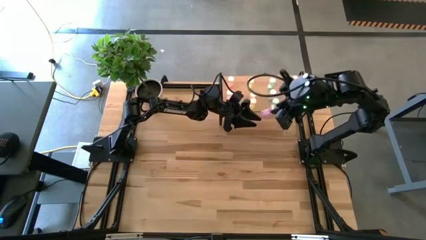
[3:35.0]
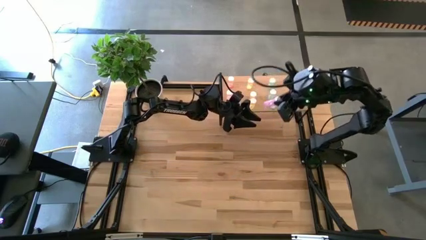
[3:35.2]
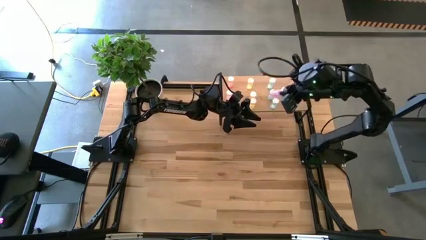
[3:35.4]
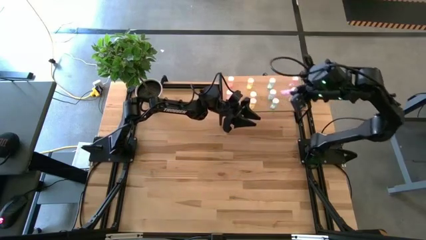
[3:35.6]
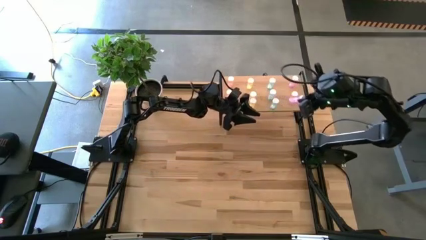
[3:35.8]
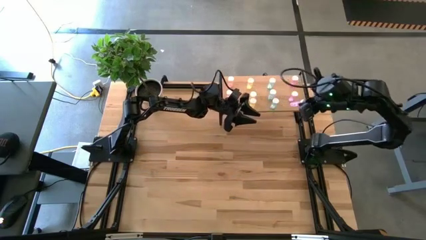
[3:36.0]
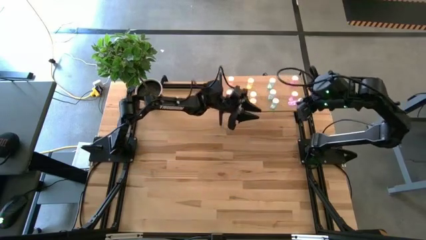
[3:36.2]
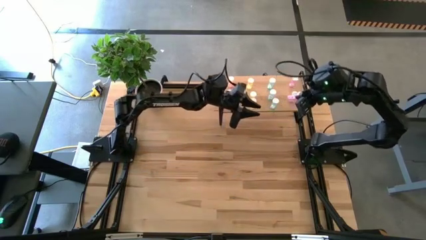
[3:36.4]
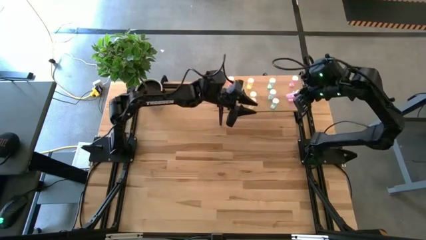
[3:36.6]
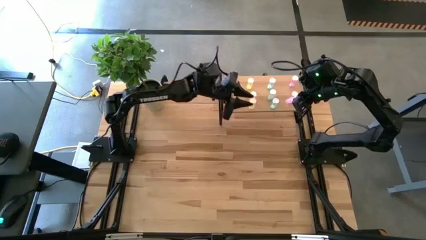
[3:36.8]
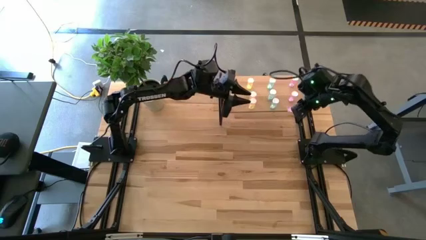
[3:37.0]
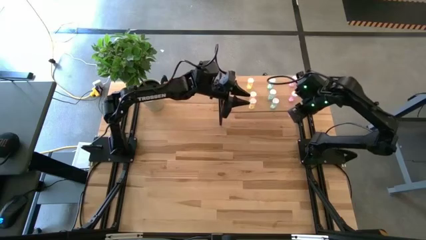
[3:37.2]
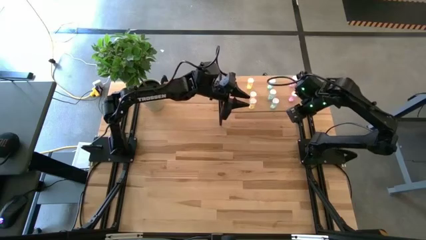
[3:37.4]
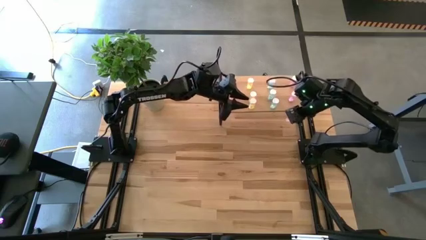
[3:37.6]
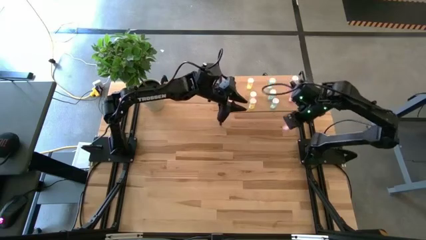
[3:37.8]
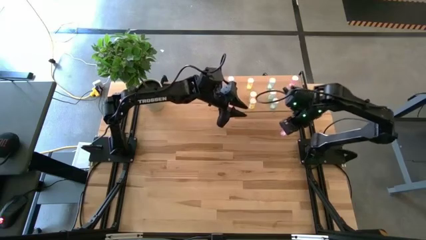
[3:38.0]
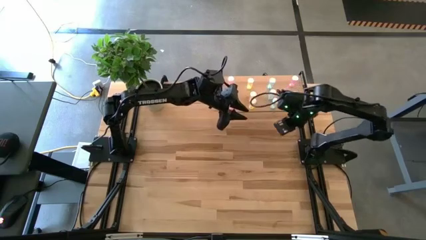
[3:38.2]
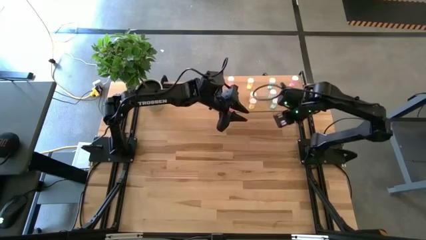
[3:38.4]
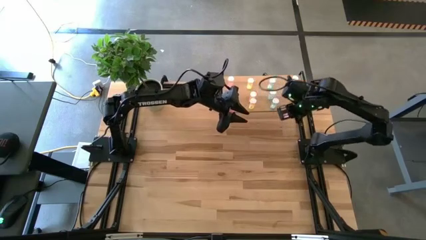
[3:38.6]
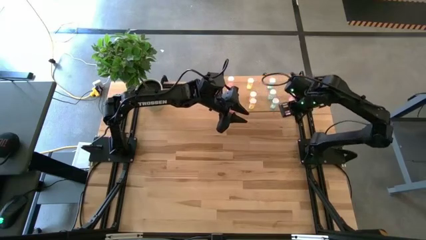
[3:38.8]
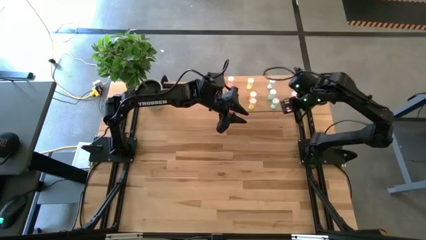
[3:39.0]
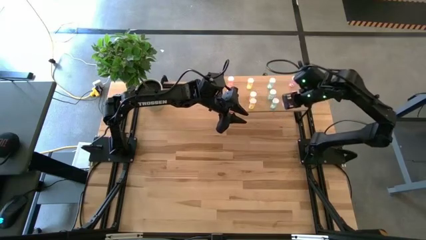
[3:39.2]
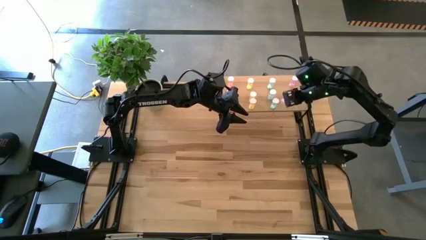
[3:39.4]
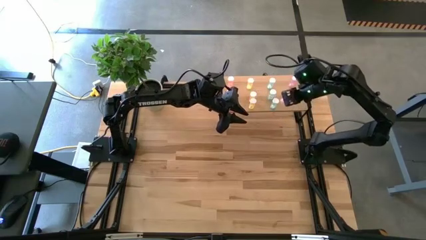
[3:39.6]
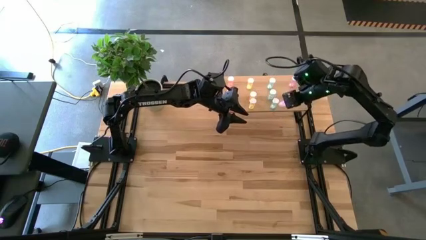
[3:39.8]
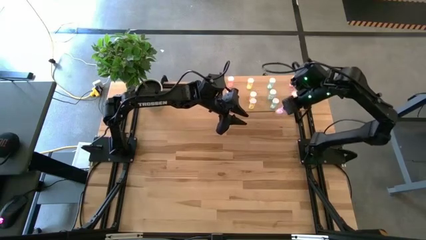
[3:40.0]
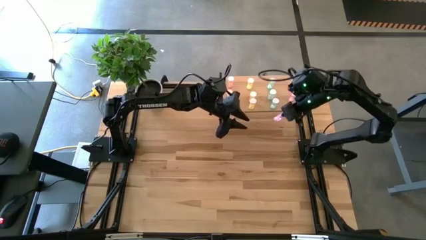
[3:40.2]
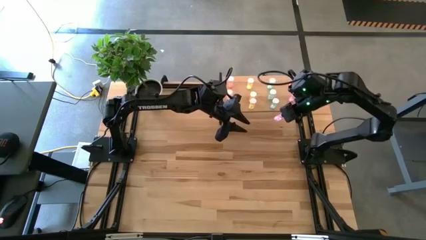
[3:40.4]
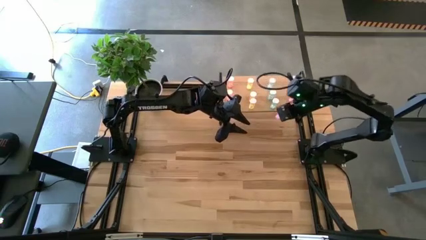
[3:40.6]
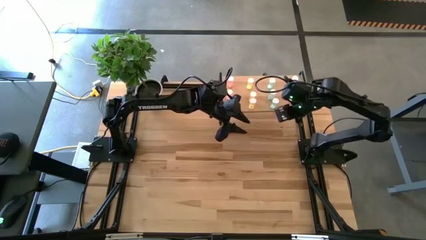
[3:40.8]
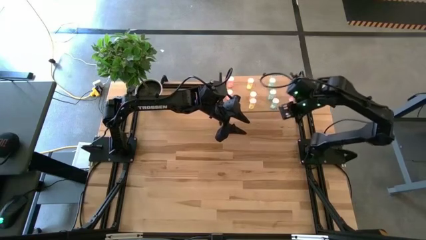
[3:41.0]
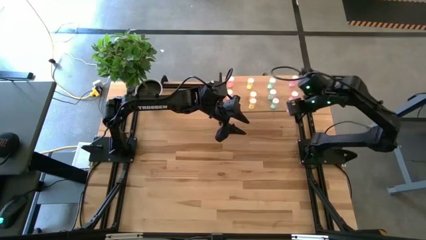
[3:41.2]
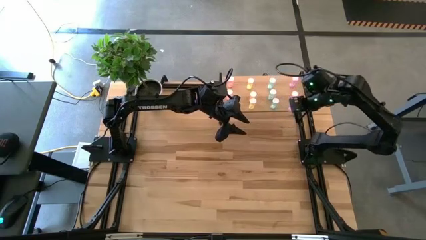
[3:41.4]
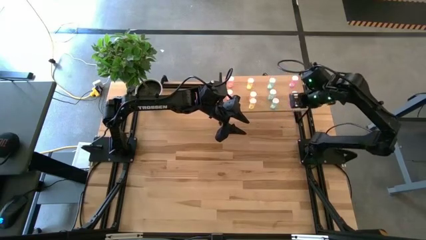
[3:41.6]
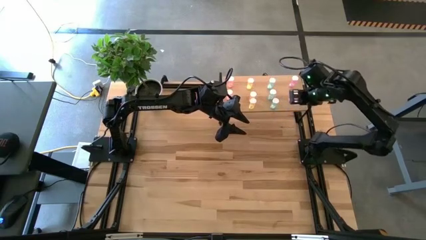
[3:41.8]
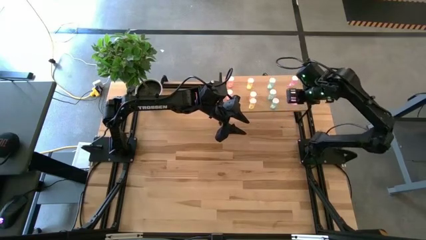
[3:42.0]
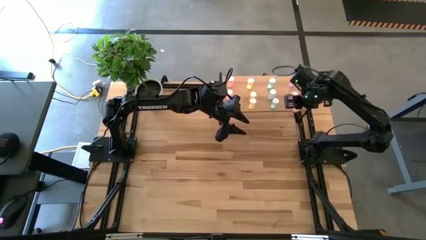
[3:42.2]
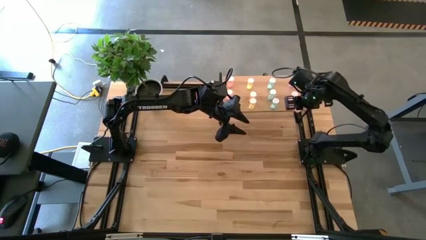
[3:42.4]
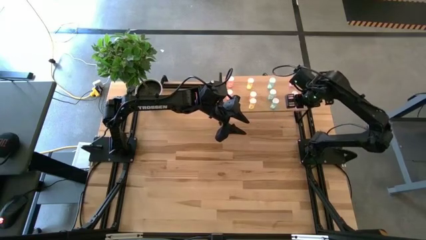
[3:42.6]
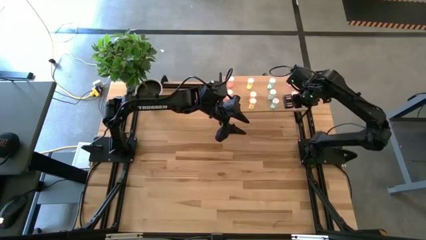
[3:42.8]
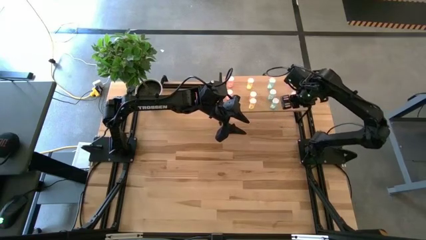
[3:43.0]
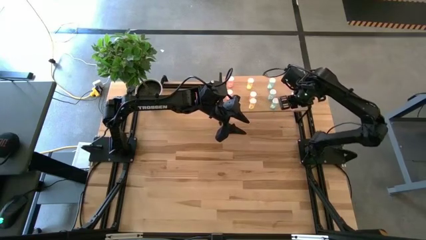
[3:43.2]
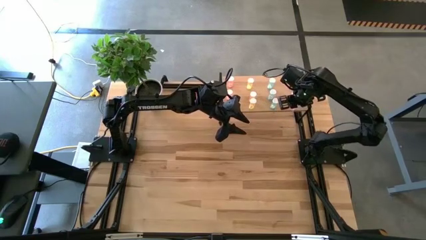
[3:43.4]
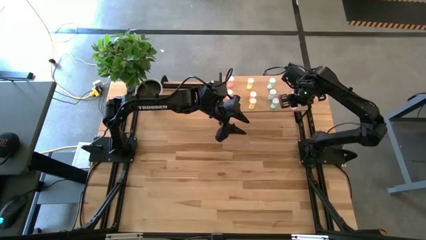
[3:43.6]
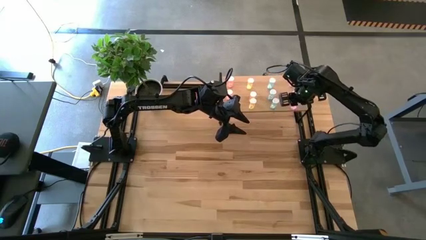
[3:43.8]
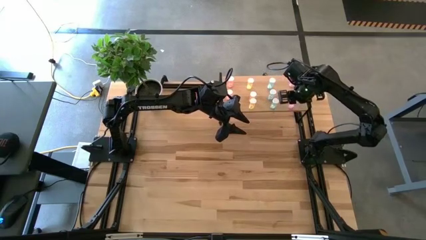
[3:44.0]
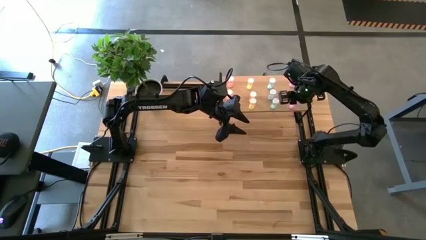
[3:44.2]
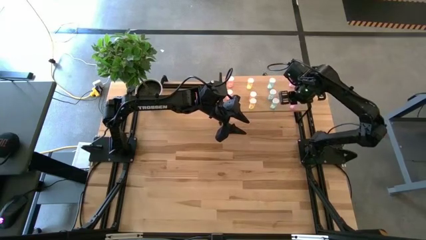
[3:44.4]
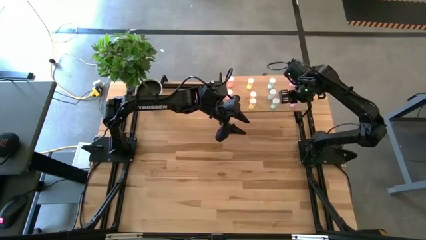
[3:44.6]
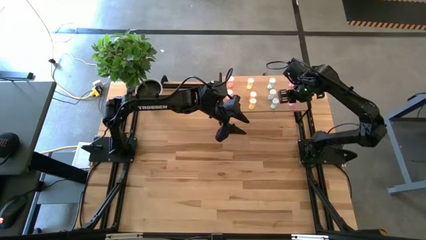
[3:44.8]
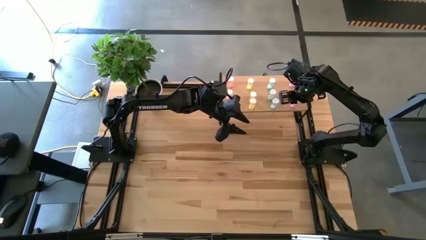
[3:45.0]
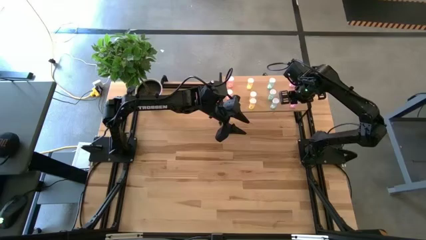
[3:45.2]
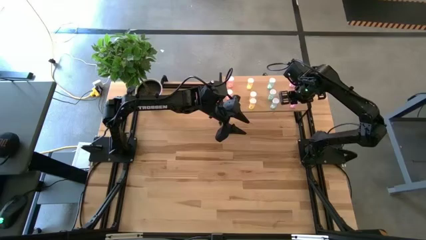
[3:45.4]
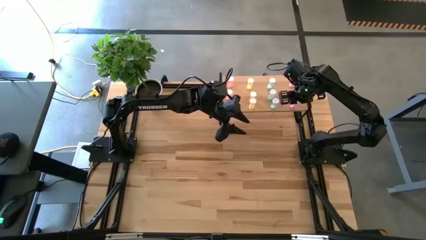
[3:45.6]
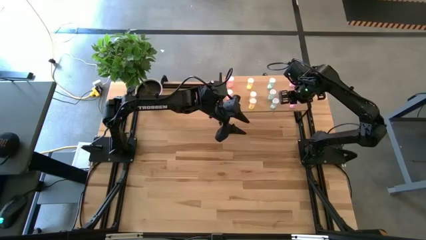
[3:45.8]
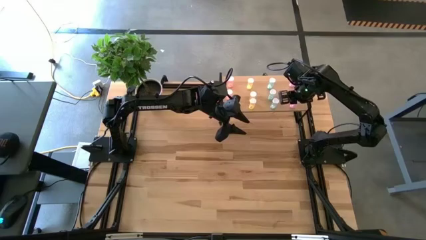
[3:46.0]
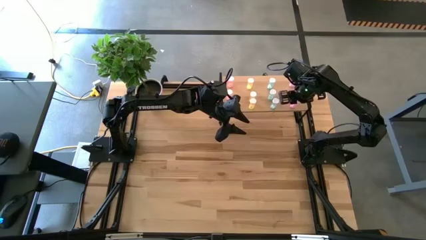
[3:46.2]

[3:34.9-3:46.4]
Task: Pick and place medicine bottles onto shelf by color
Put the purple pill bottle on the shelf aligned with the other purple pill bottles

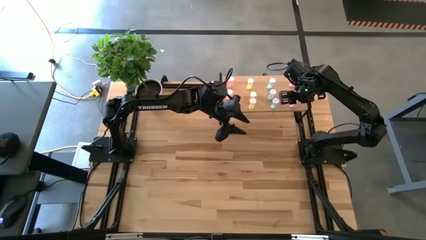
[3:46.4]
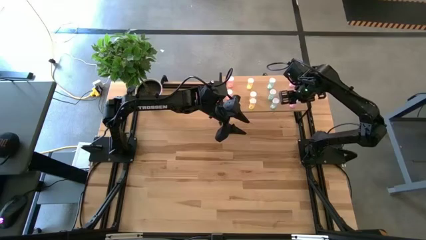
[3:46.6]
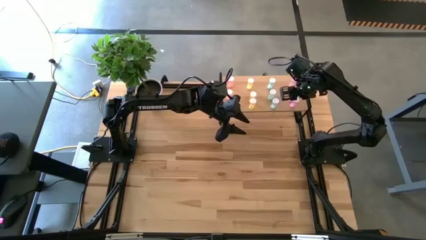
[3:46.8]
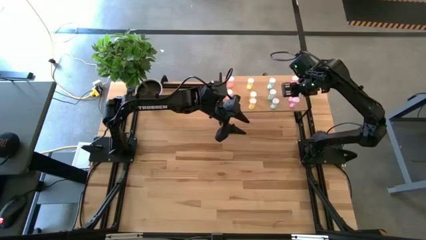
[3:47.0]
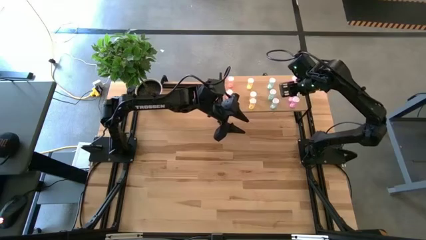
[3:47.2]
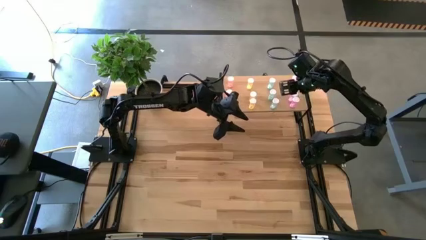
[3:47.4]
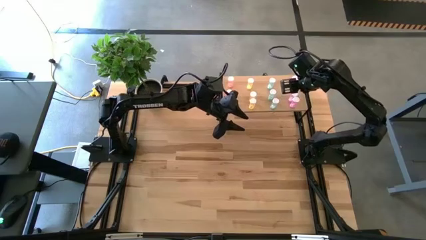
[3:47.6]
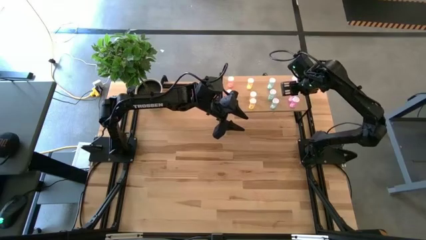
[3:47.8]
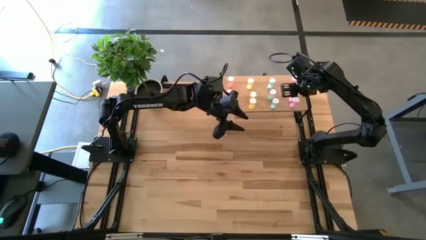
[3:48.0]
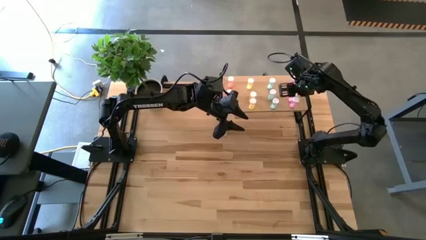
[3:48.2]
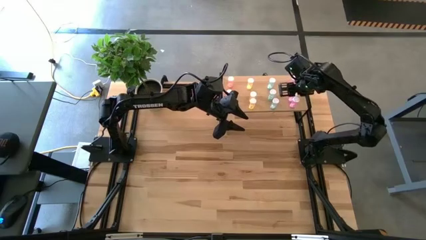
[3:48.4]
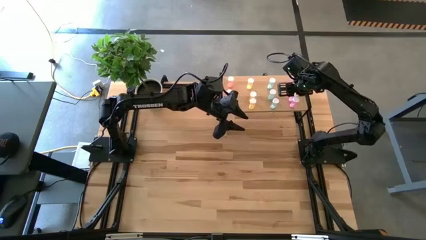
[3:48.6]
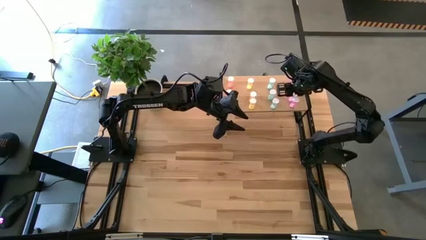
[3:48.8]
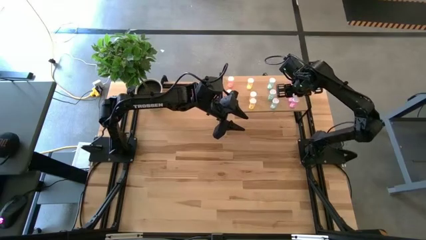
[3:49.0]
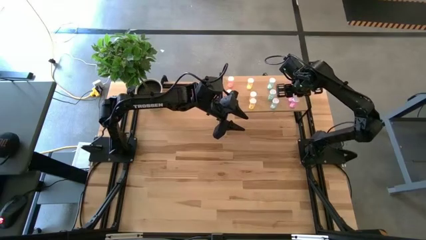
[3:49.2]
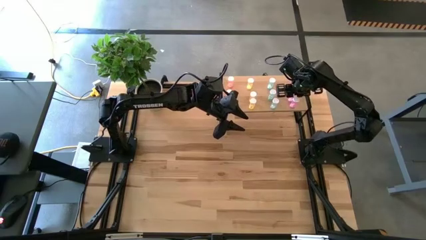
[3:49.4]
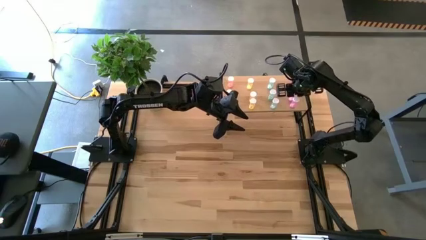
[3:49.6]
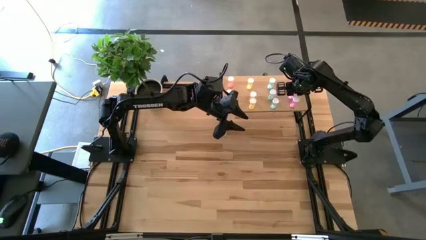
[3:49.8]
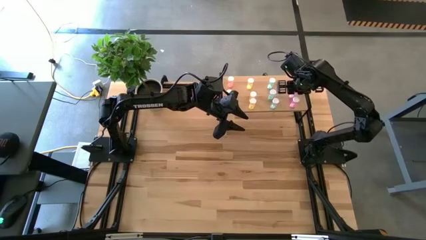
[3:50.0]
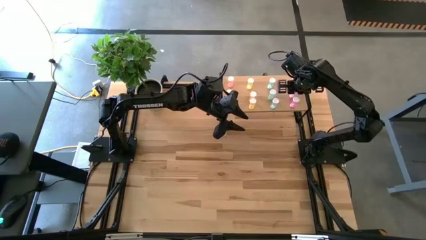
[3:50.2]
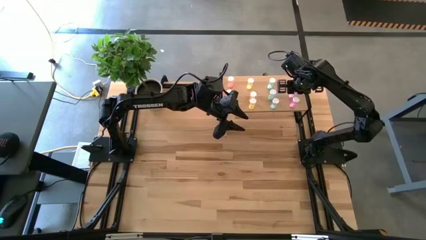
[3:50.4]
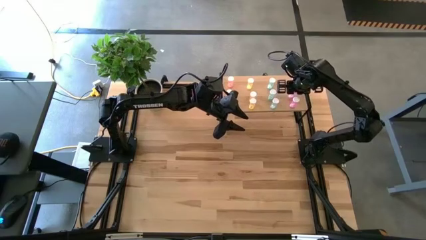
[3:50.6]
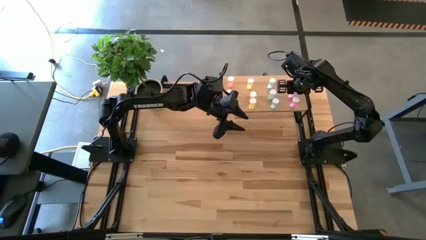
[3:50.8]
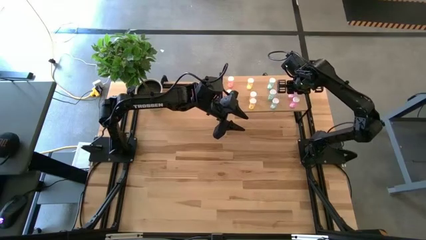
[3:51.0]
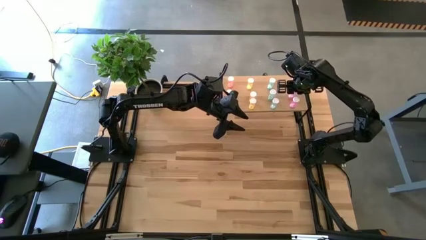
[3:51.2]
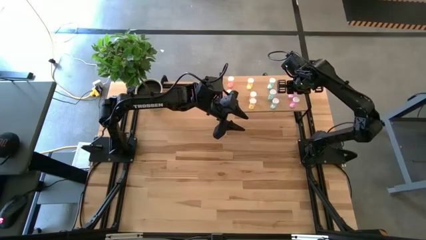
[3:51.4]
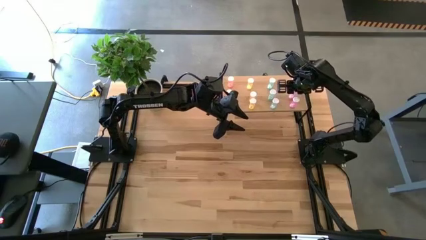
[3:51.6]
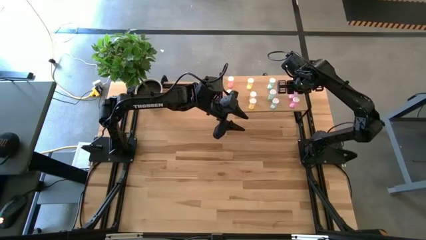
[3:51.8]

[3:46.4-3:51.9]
Adjust the purple pill bottles on the shelf
